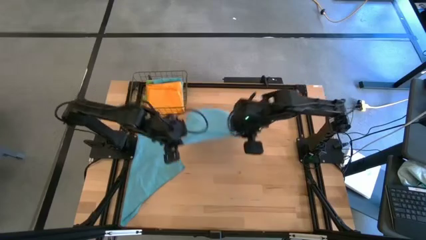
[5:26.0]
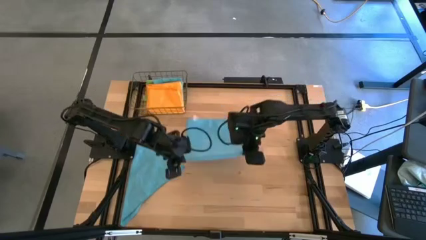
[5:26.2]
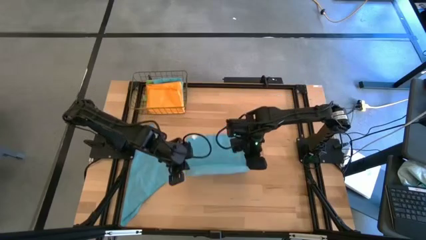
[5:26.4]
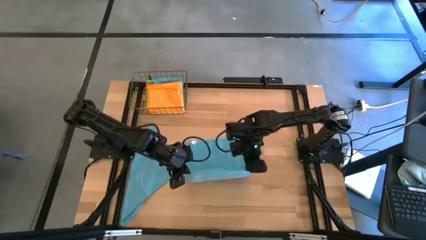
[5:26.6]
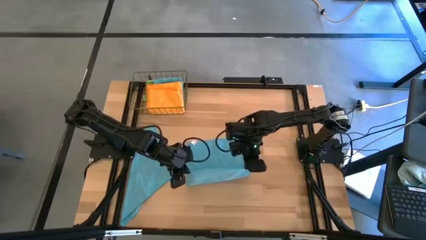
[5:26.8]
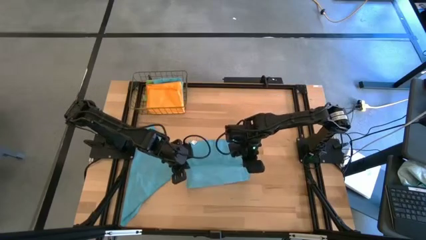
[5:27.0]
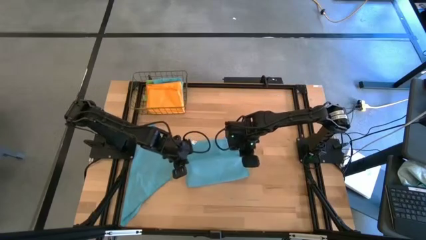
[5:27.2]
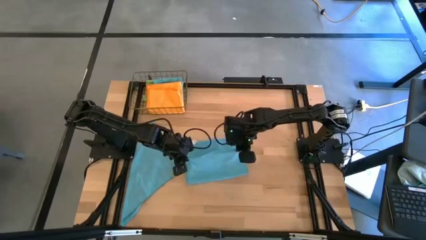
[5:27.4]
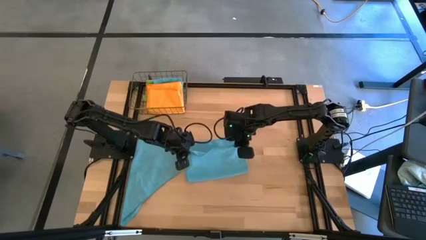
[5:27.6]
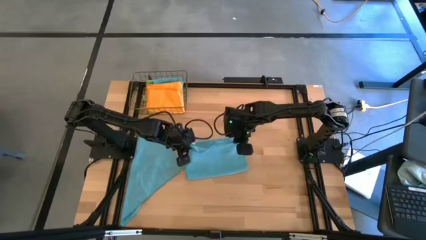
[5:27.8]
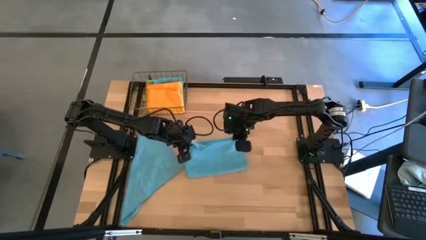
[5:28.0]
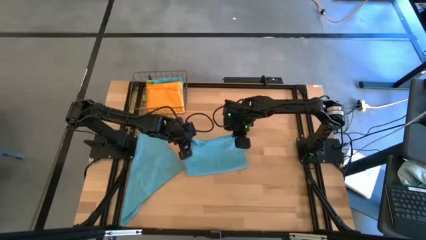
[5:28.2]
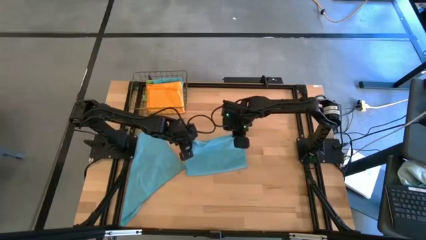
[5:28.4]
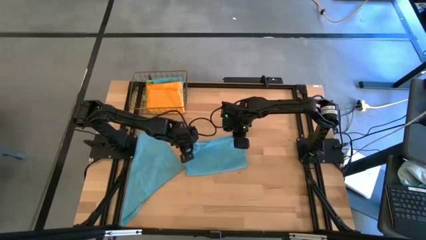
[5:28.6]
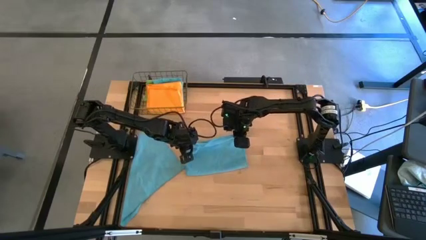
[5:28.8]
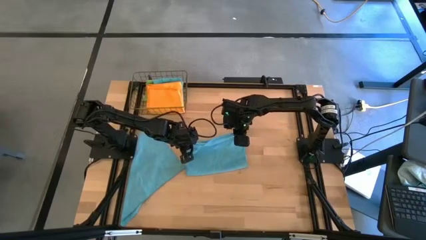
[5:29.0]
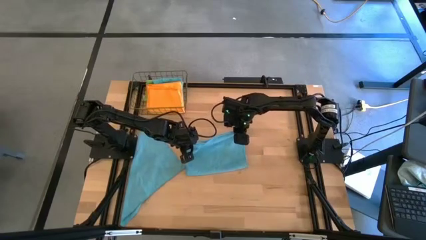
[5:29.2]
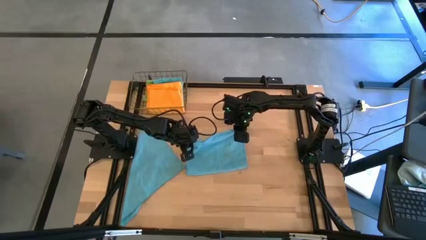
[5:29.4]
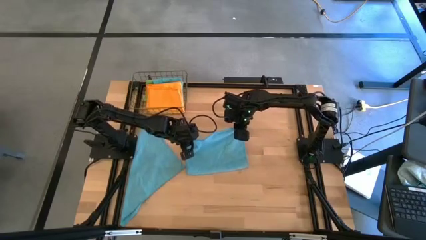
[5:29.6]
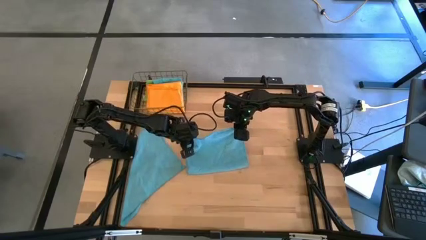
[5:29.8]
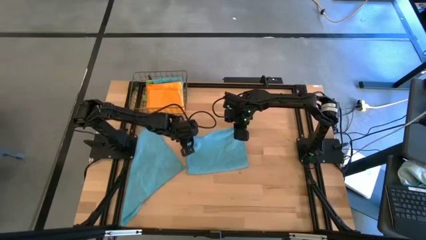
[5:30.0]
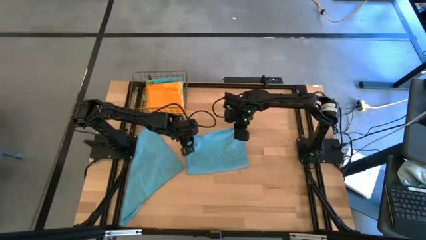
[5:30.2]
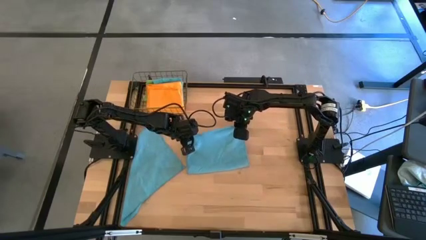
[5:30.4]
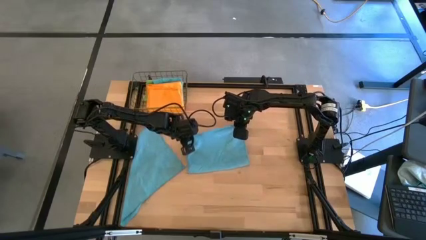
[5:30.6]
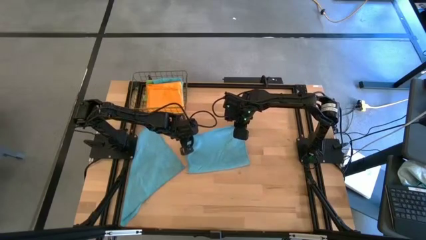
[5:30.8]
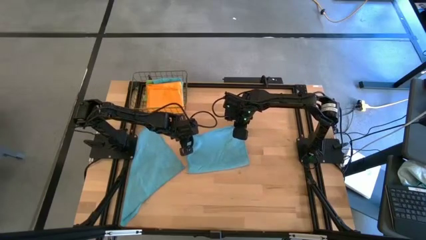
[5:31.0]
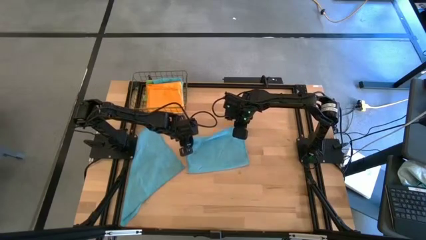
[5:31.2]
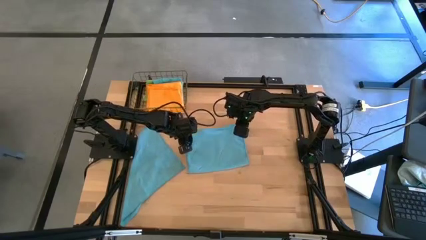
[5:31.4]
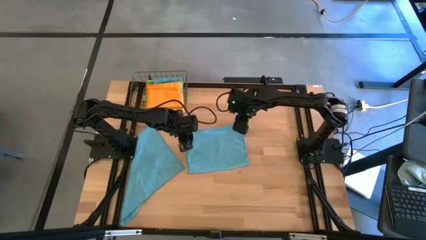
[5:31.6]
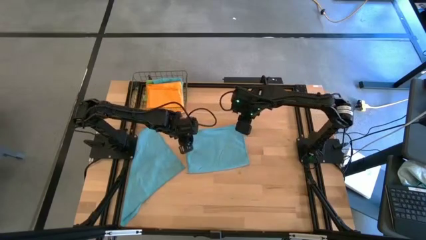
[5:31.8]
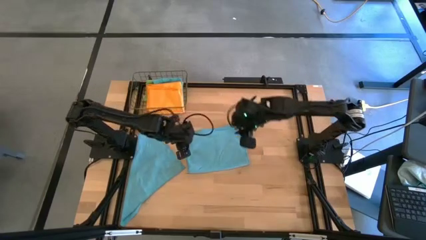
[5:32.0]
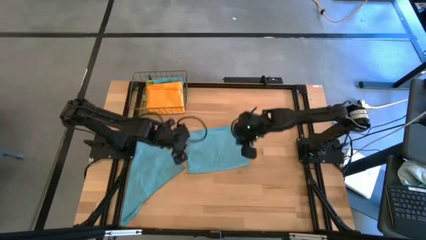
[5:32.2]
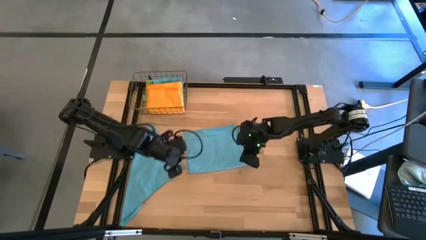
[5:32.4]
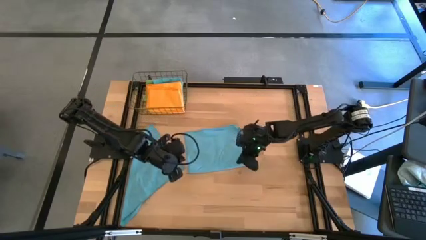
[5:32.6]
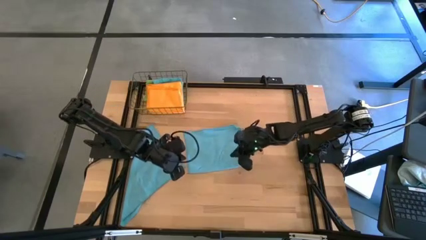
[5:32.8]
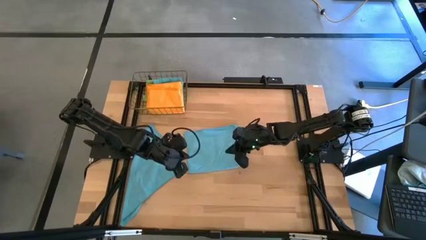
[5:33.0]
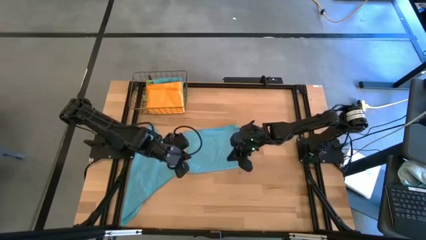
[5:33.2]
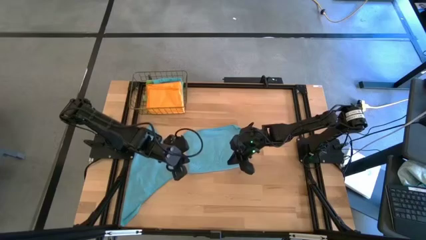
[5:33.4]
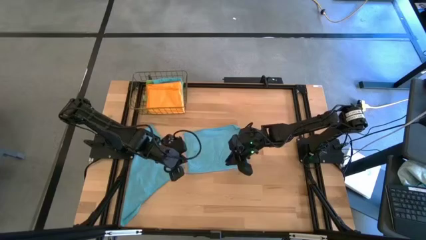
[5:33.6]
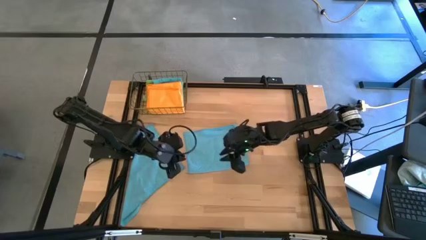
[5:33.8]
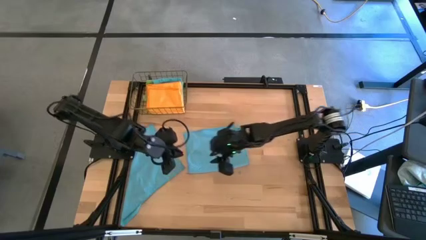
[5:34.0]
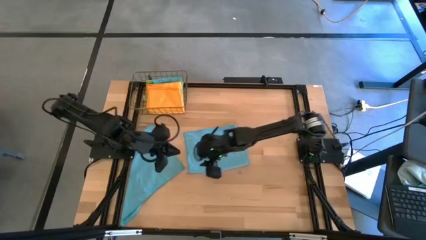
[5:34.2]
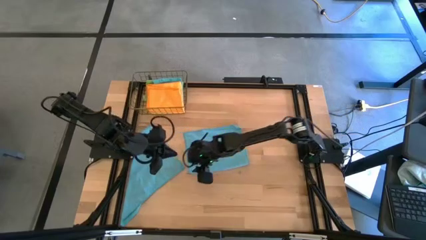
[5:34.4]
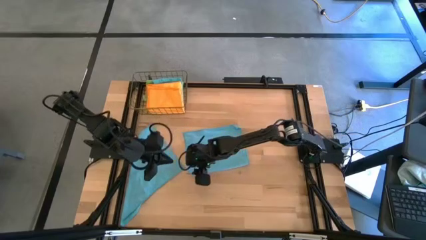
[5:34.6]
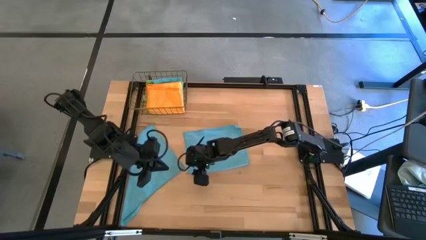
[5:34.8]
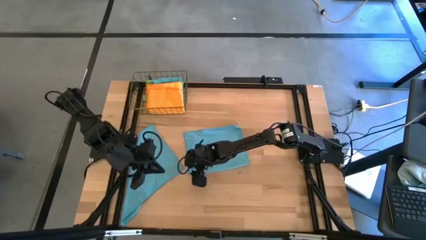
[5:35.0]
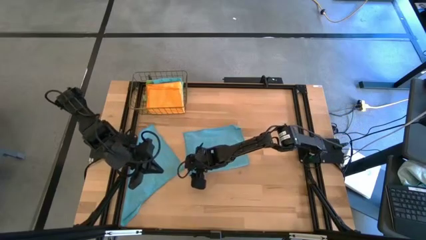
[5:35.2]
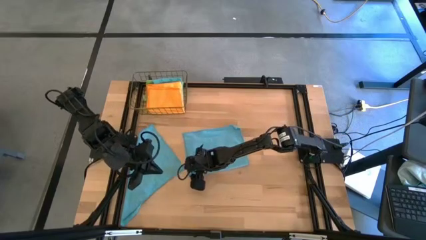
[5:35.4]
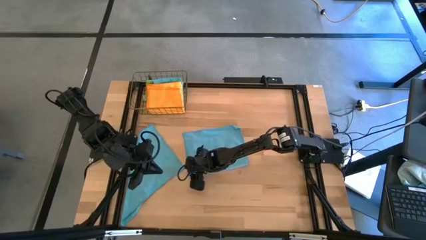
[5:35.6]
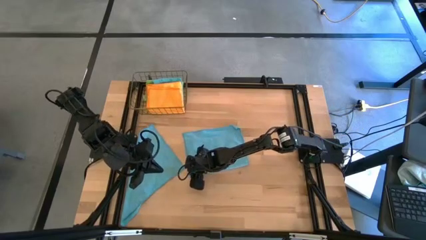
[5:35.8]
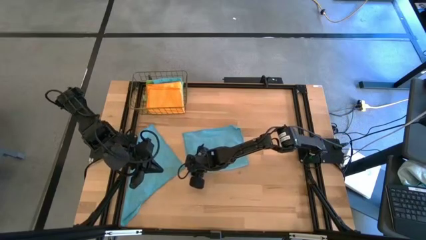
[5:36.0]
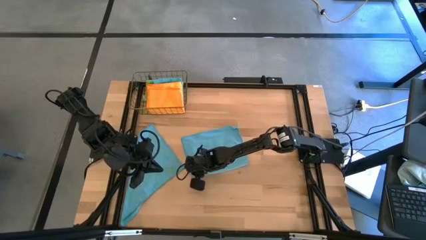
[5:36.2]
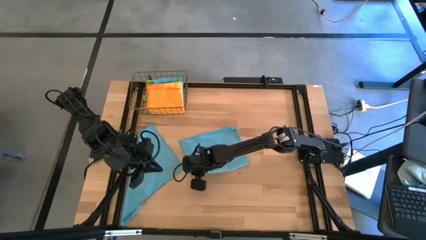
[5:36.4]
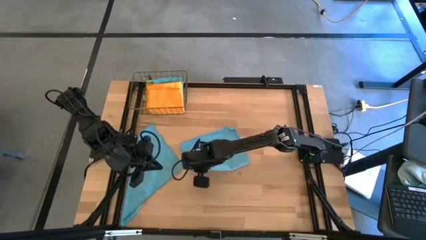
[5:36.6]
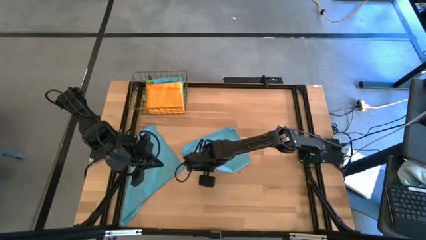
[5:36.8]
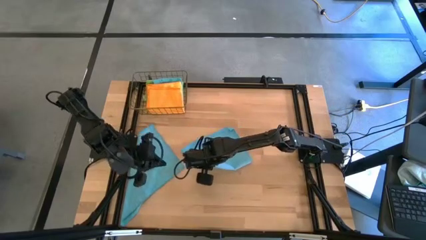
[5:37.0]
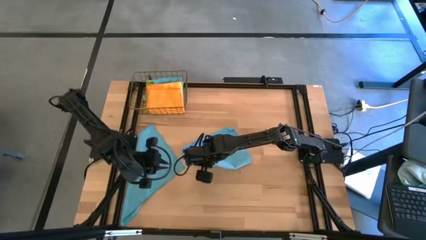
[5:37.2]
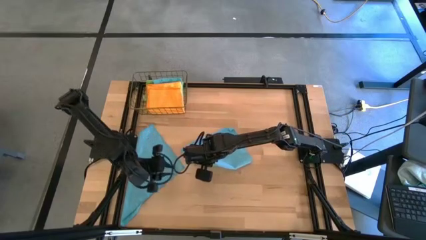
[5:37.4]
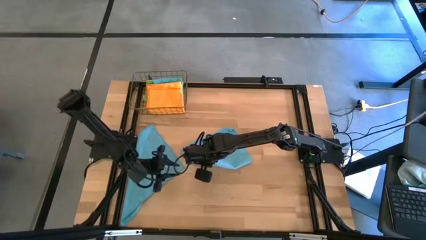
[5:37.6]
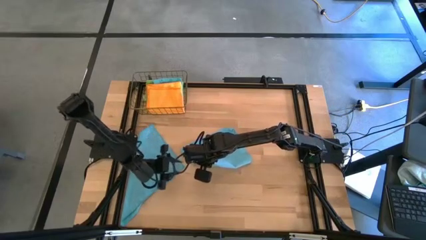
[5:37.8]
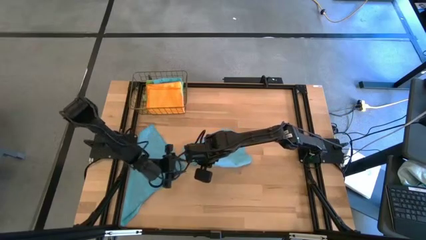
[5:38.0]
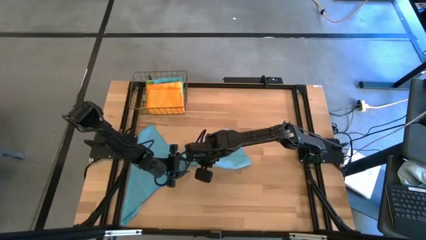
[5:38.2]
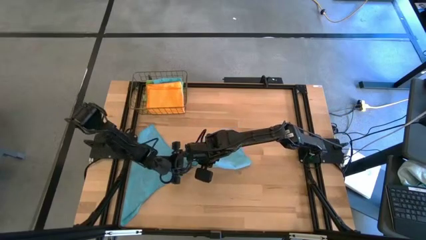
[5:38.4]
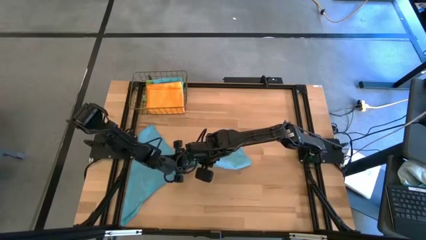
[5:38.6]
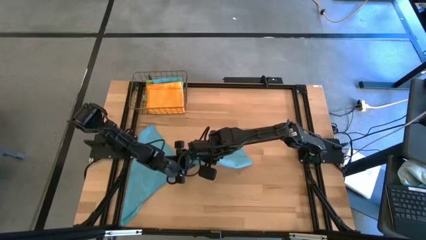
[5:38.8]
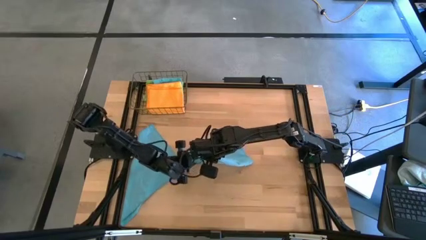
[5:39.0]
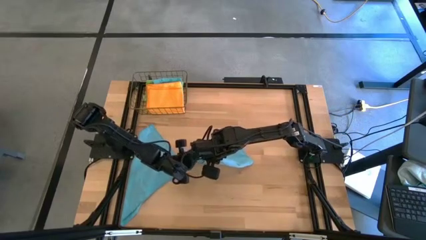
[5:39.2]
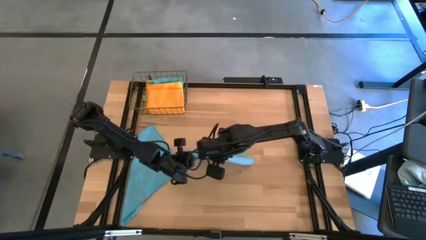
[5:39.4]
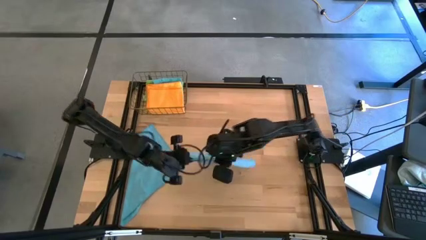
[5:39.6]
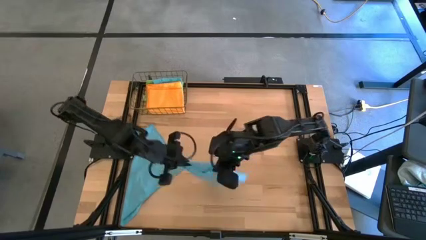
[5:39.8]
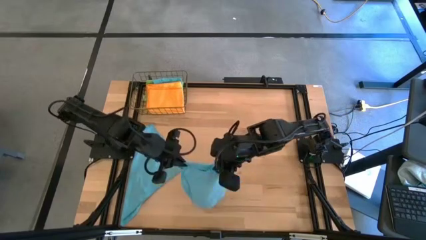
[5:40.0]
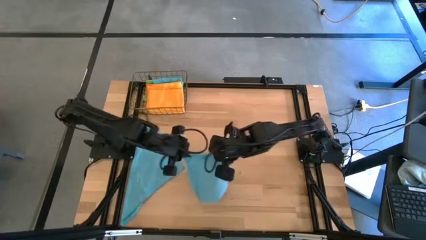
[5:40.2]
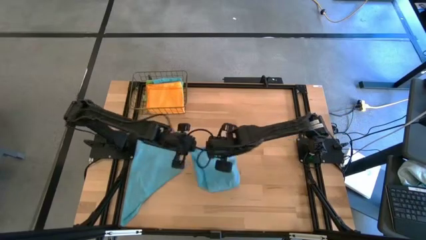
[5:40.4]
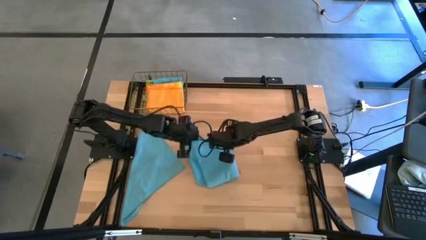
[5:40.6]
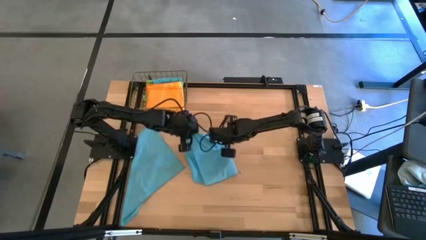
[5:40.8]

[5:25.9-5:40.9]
Task: Fold microfiber towels
Fold the right light blue microfiber cloth

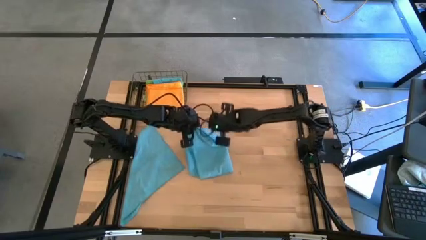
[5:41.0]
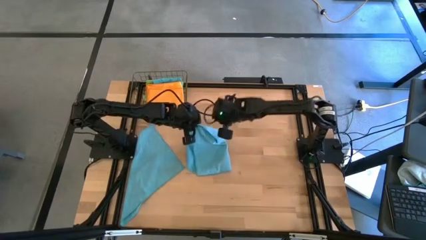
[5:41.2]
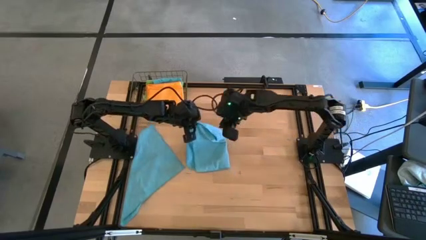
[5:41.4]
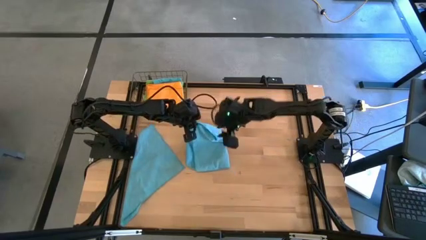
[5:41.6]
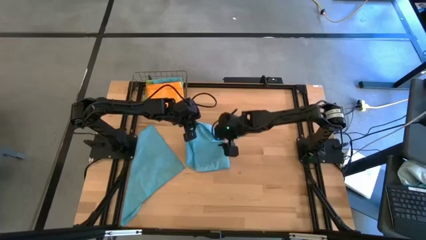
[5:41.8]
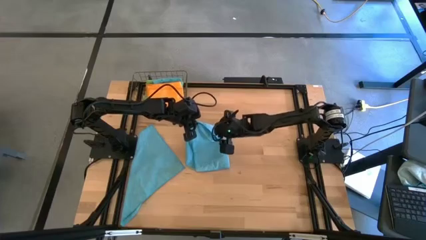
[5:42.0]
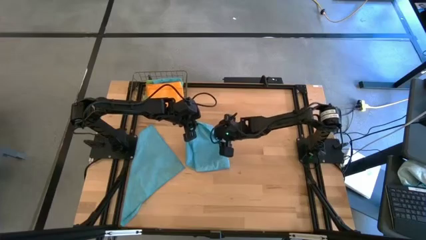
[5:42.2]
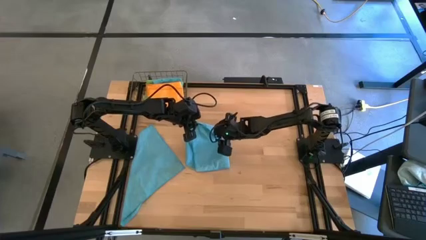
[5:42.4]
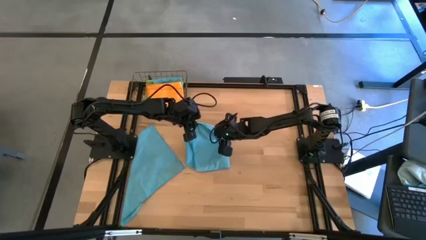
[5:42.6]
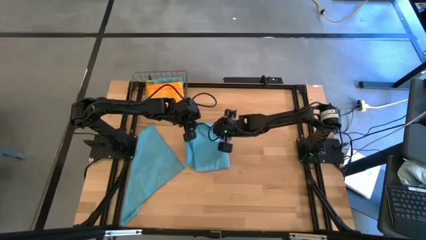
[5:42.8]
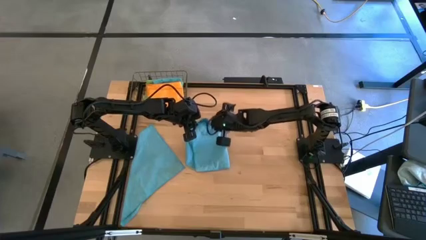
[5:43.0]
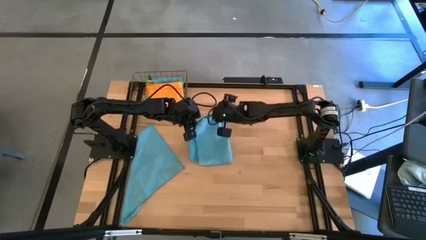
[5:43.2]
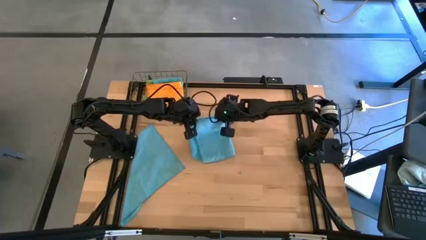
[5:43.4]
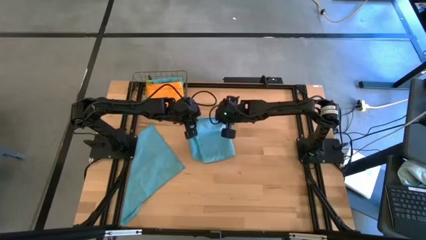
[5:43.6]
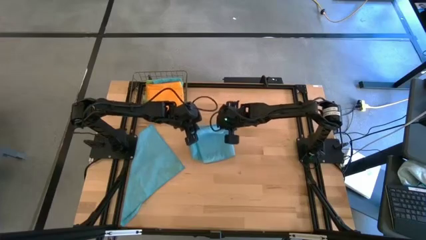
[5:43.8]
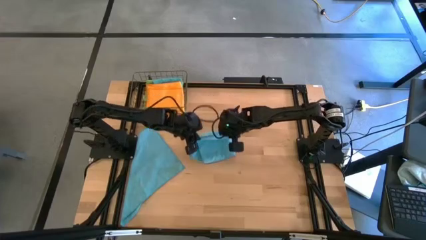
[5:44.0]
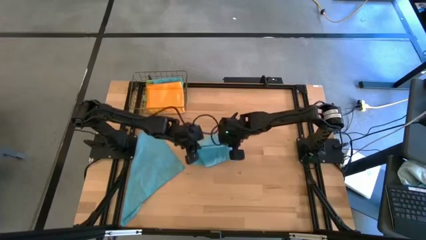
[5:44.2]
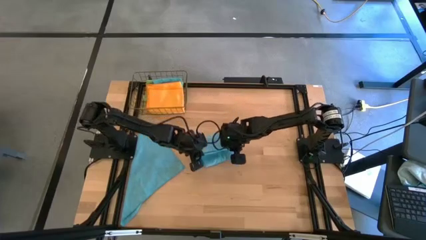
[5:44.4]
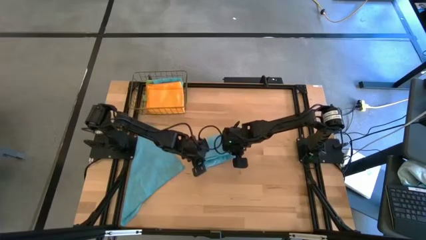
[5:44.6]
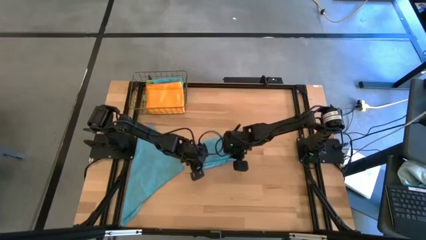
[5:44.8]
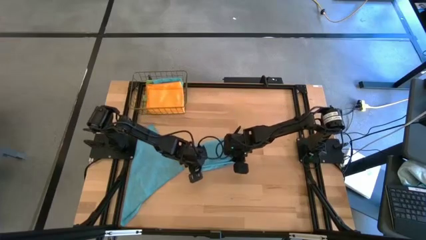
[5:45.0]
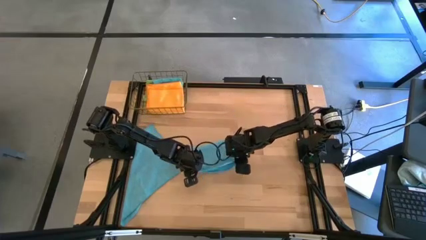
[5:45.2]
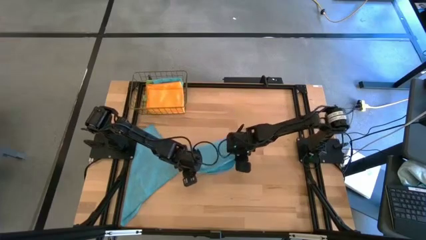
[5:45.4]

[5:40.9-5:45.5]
Fold the right light blue microfiber cloth
